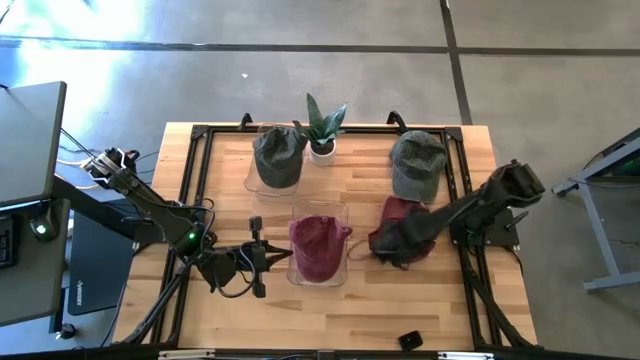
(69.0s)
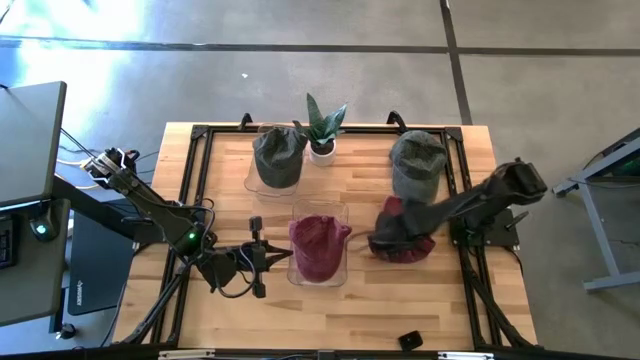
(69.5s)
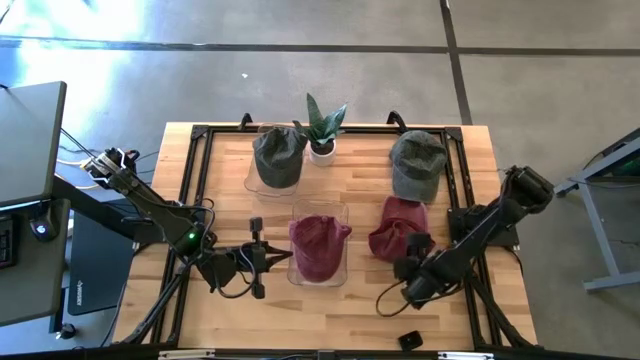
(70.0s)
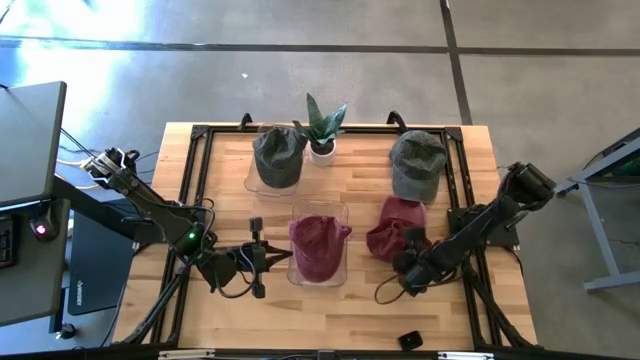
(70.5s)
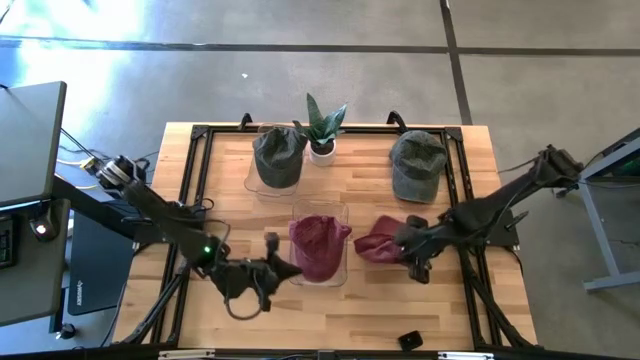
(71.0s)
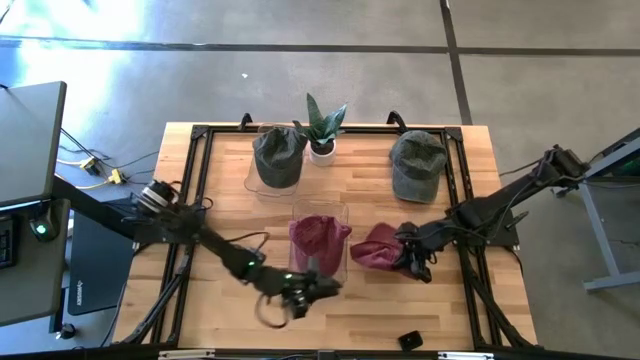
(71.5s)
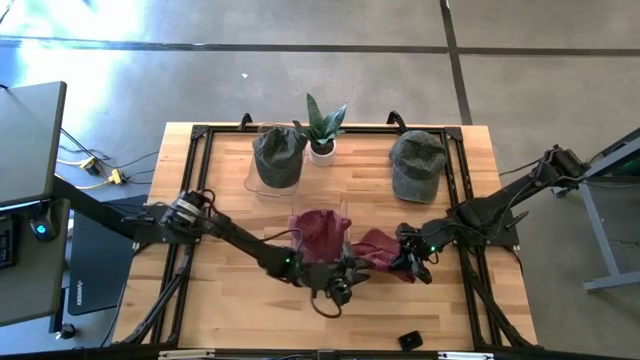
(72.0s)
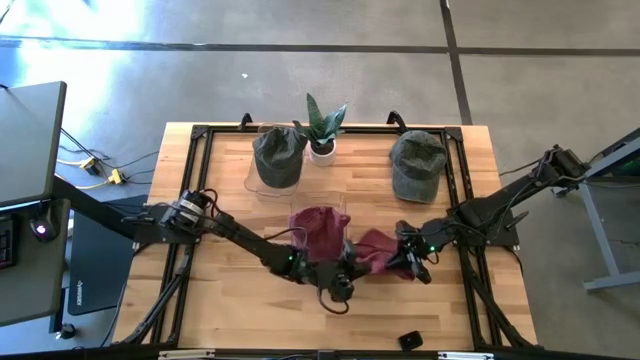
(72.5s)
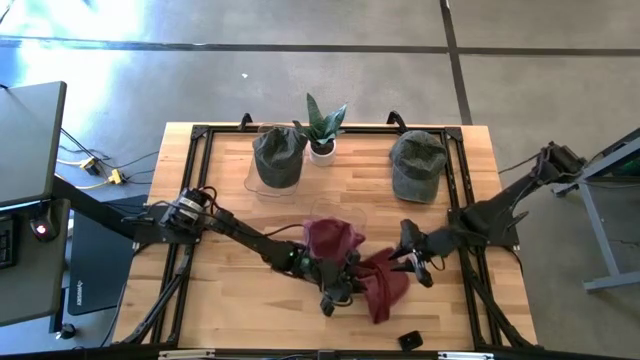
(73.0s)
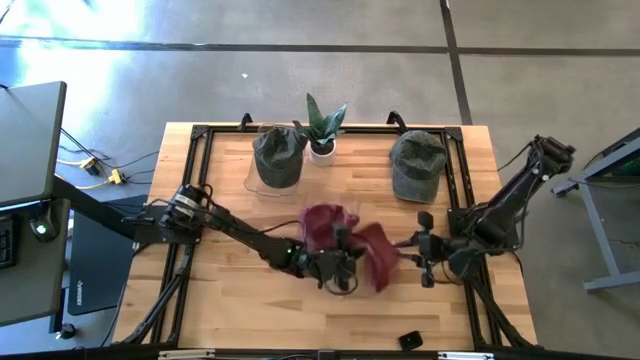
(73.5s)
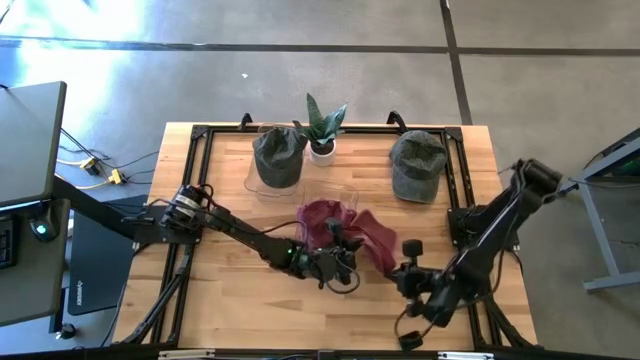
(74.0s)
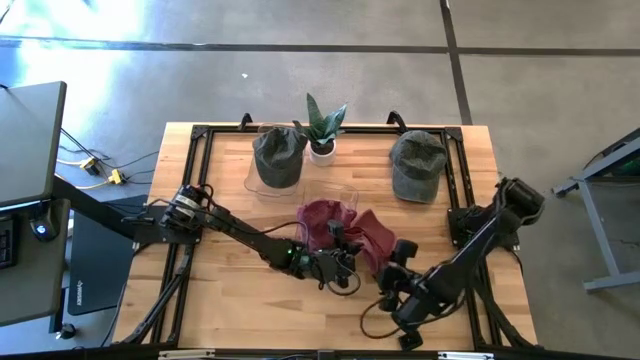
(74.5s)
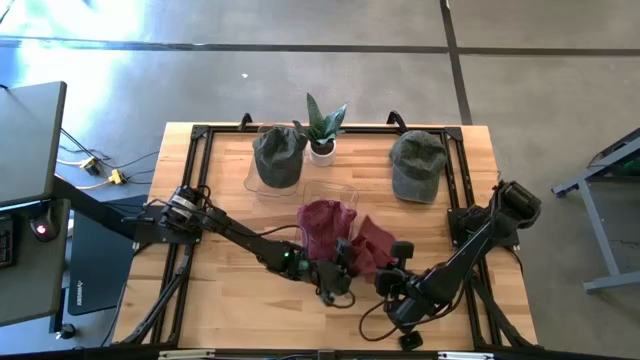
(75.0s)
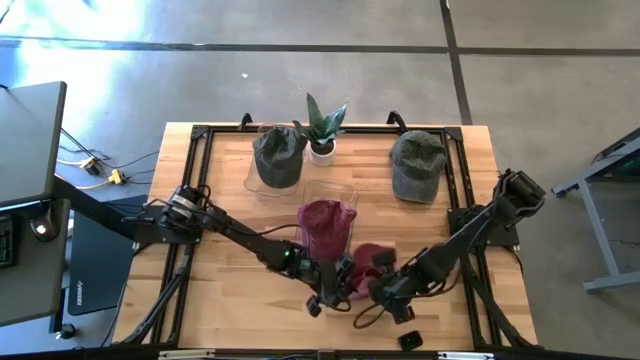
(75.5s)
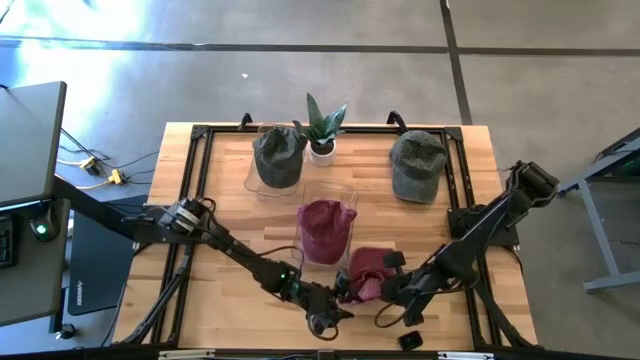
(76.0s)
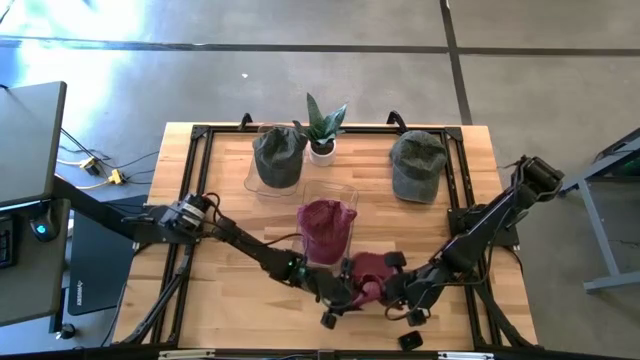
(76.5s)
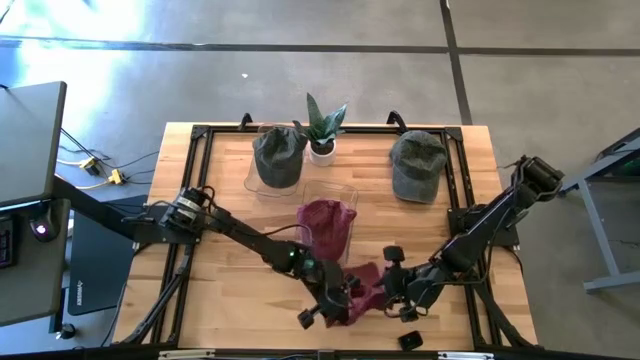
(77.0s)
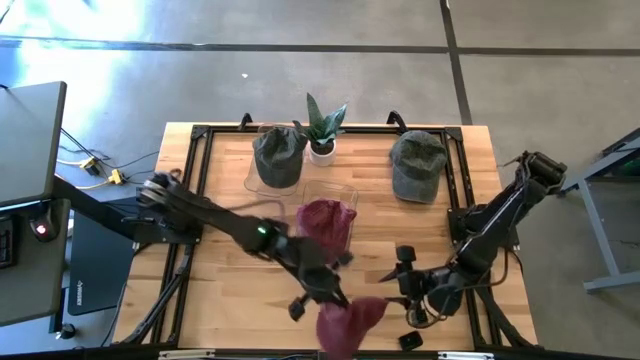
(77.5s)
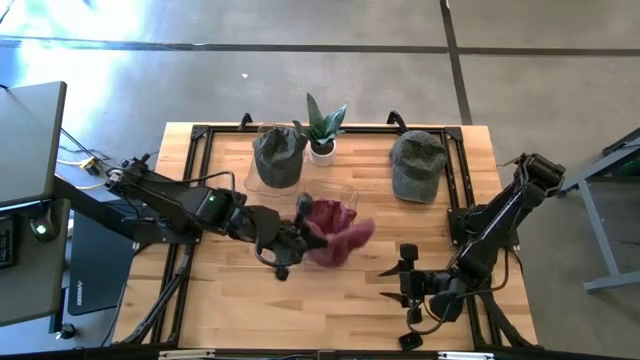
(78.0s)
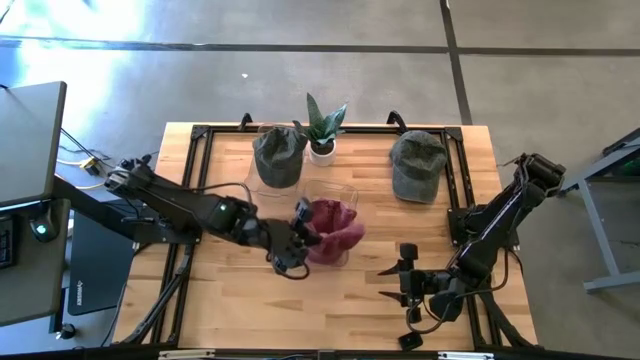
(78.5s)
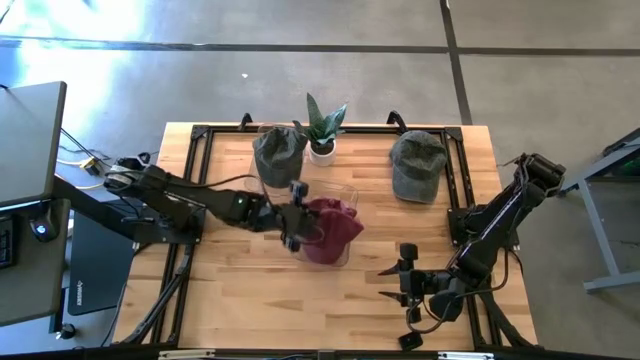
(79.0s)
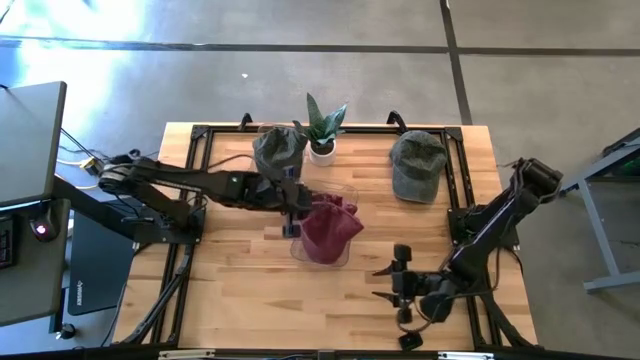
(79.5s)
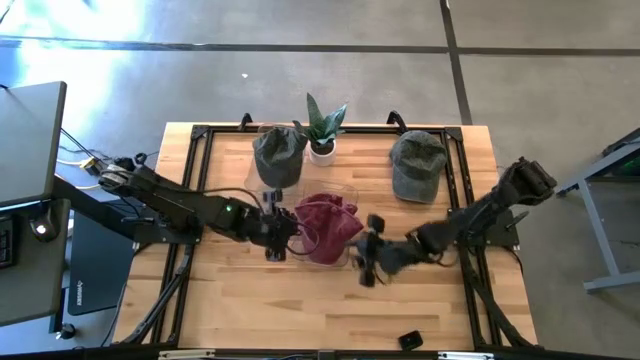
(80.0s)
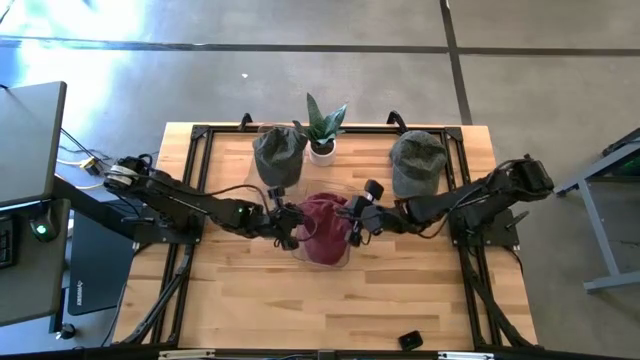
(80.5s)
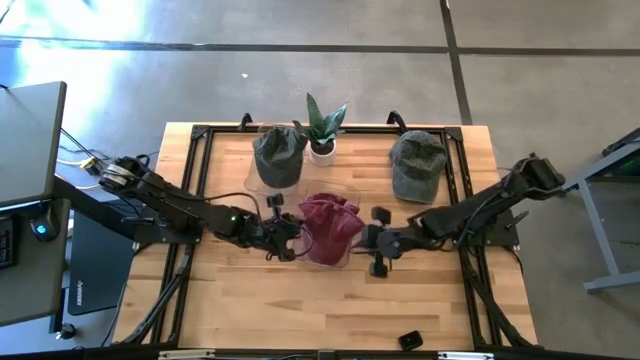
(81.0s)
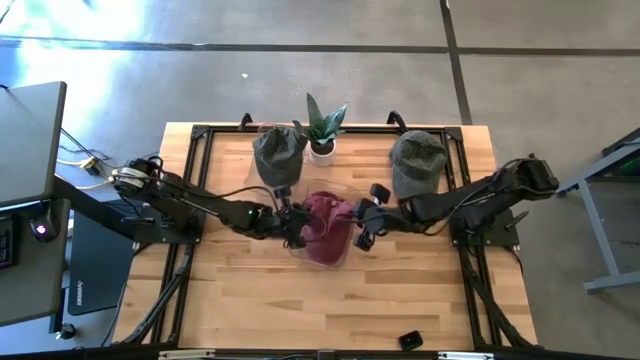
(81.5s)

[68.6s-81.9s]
Task: Pick & Place hat
Put the red cap into the bottom transparent bin

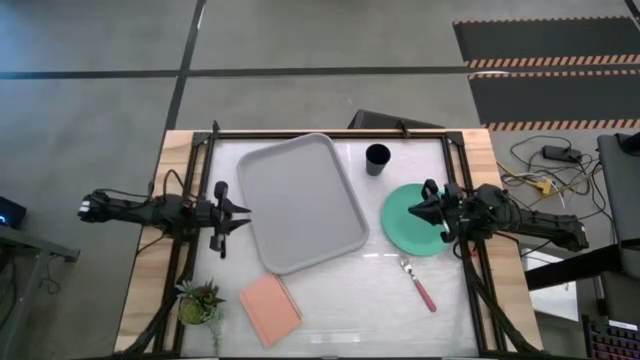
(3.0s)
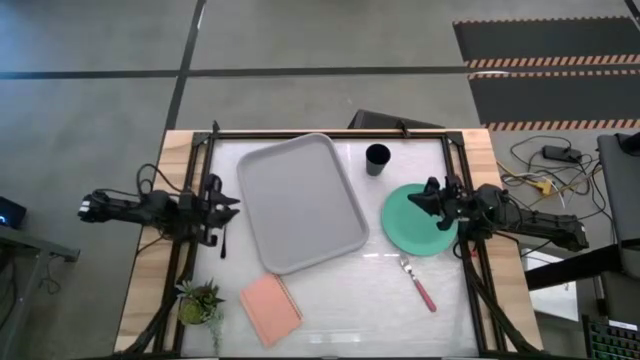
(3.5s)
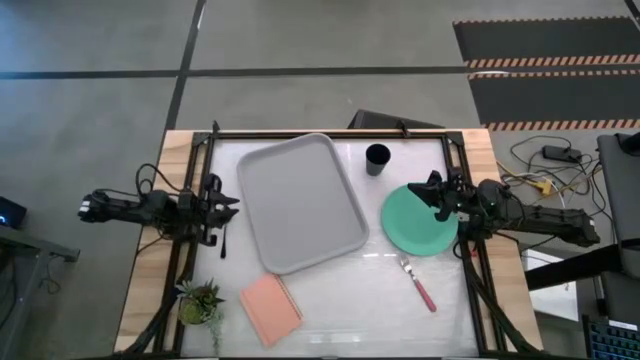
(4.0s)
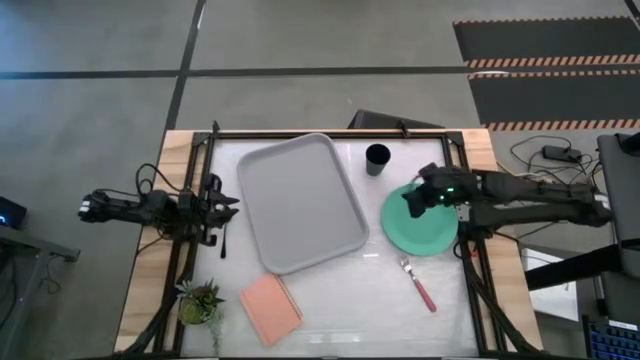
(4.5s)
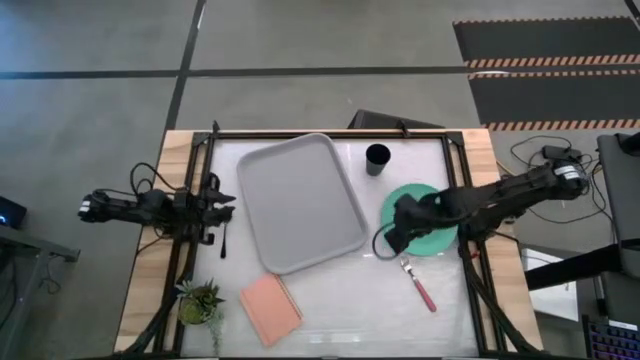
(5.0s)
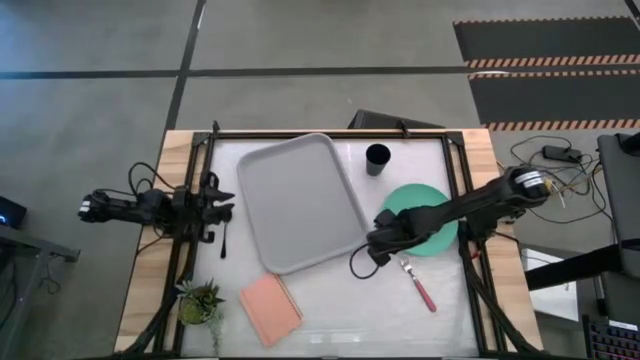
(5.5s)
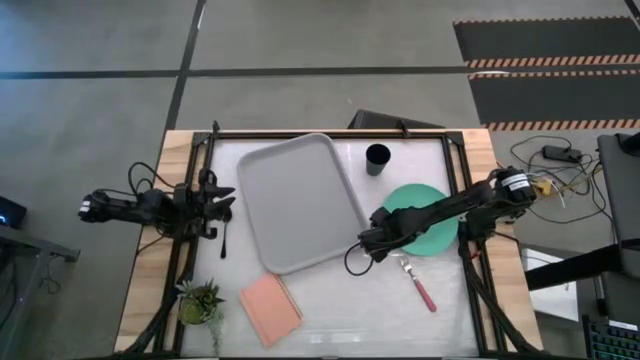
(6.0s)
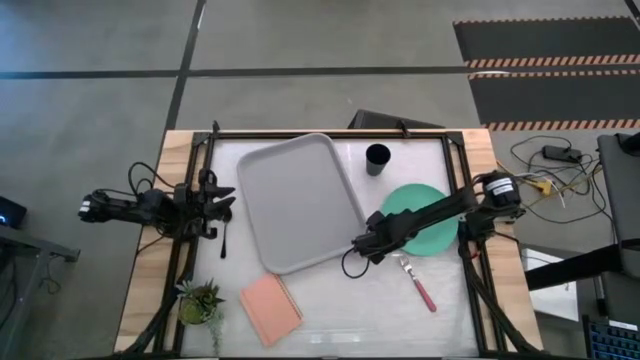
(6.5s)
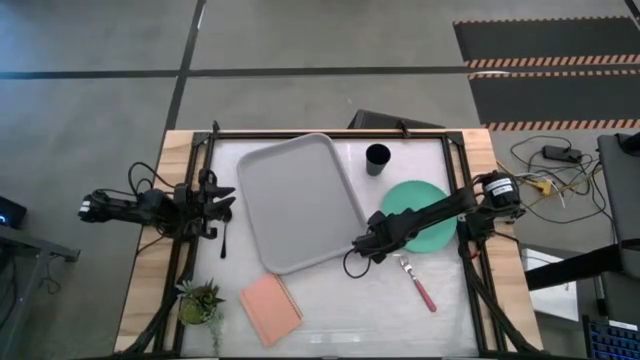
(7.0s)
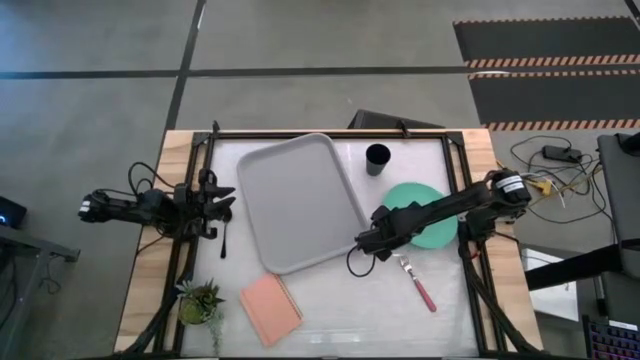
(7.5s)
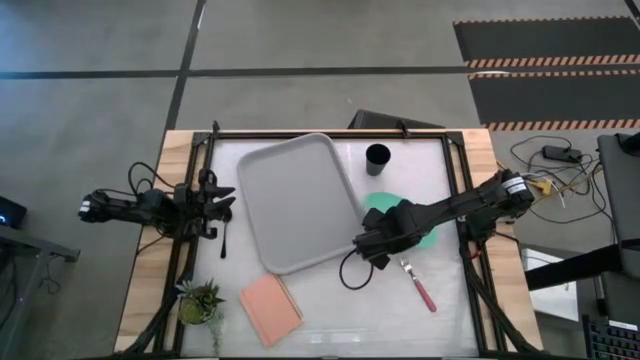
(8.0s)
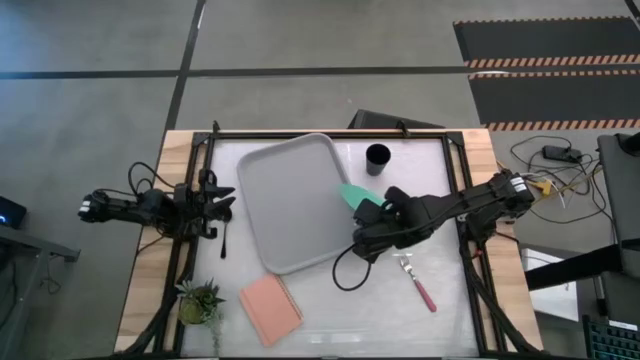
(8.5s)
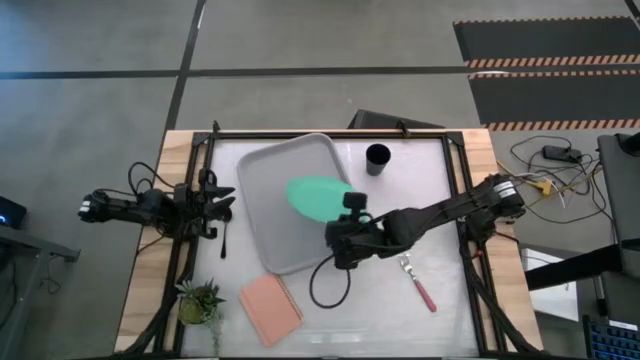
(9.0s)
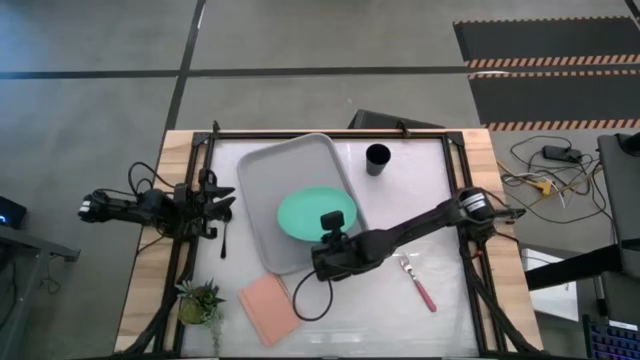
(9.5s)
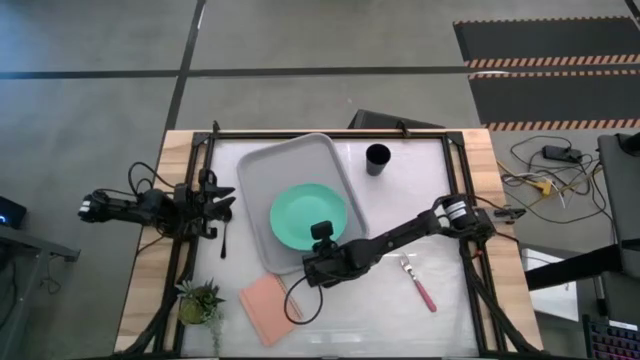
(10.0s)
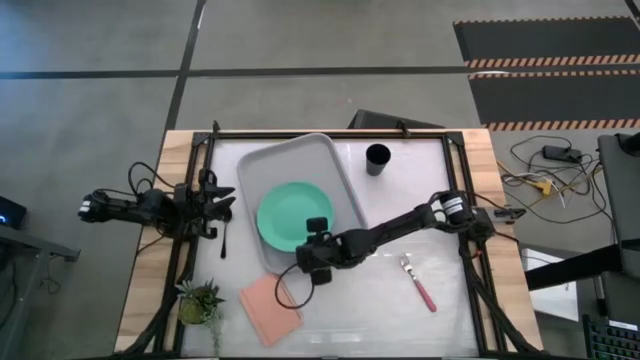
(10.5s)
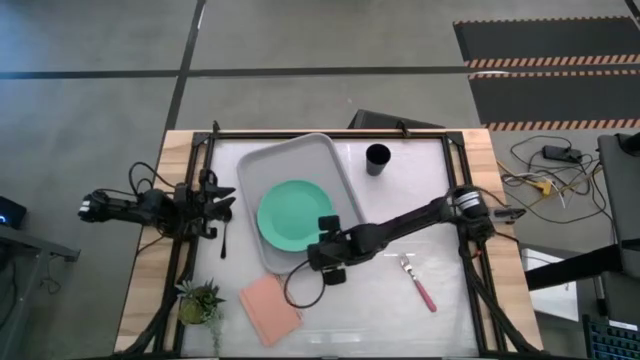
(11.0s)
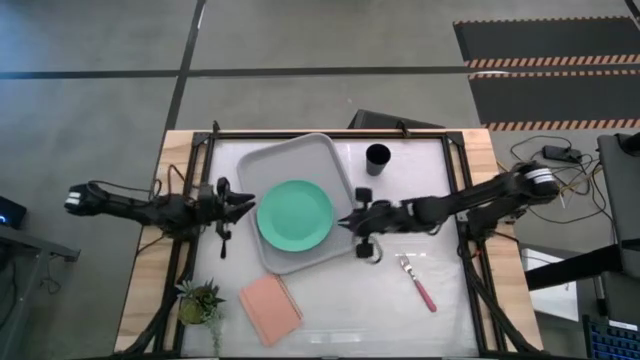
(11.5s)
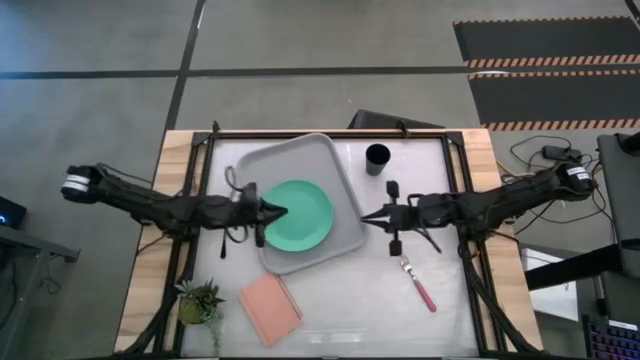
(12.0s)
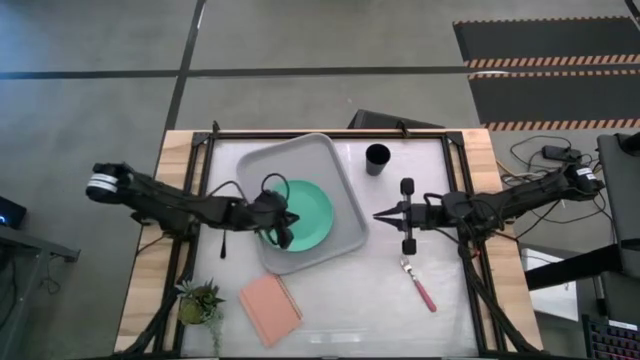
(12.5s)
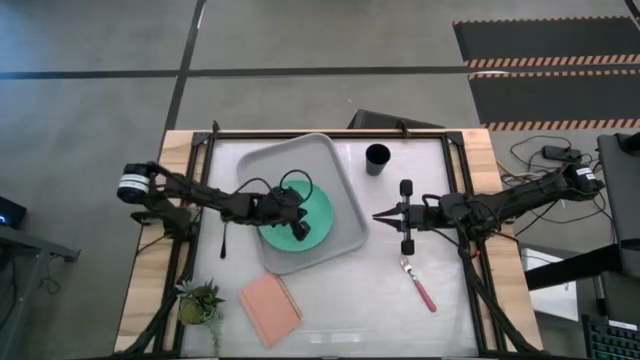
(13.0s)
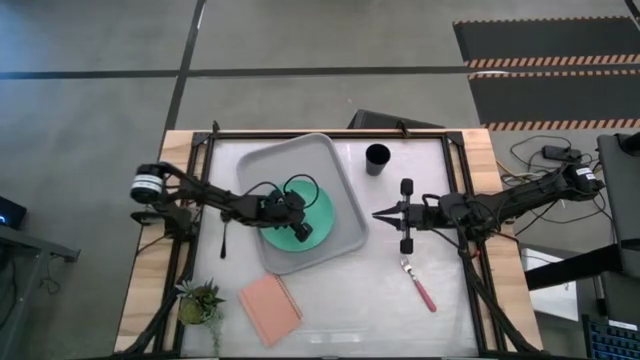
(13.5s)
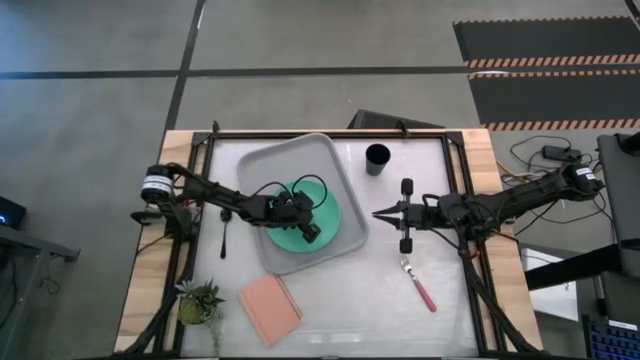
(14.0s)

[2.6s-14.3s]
Task: Pick and place plate/cup/fork/spoon on tray
Put the green plate on the gray serving tray
